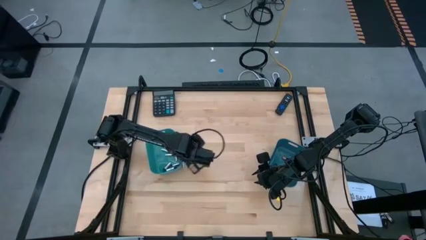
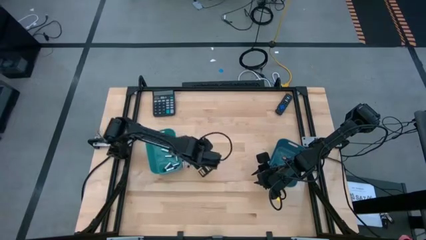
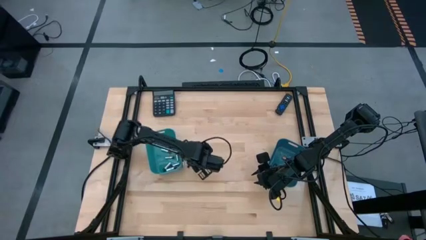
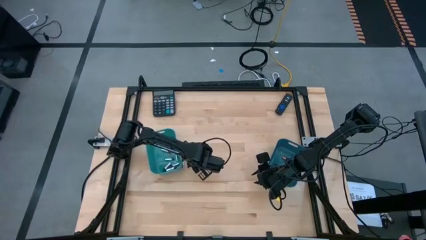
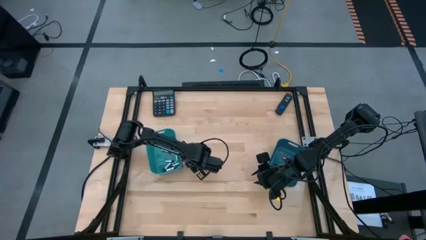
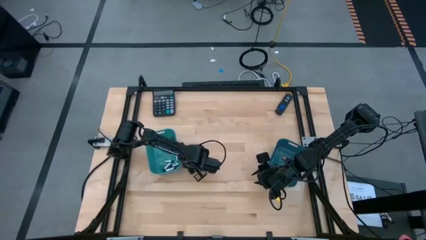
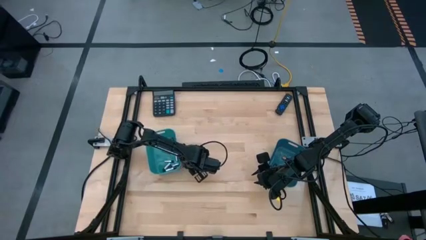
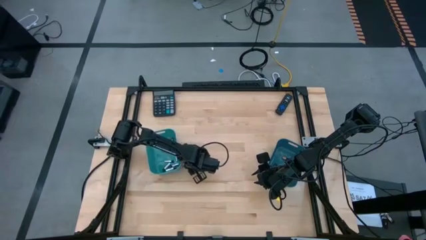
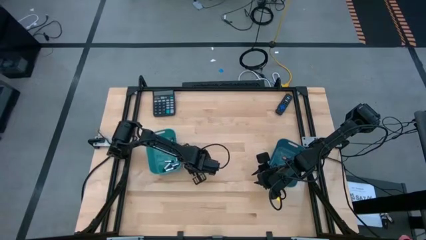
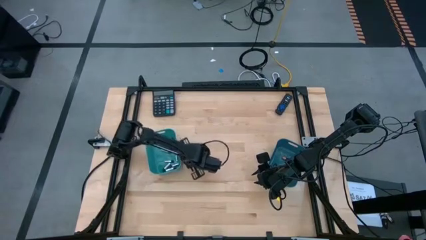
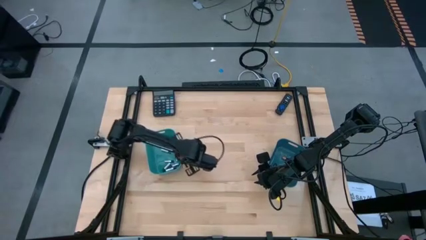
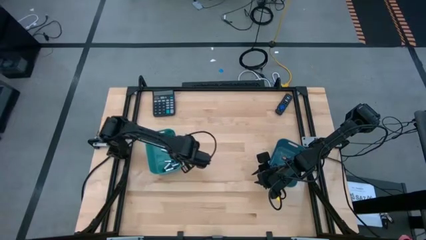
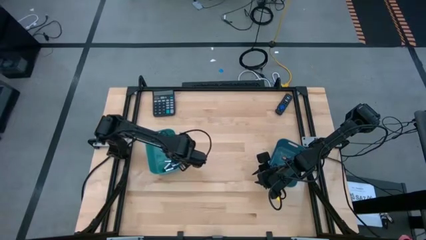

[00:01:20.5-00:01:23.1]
Task: Sort batteries
Put the right white battery into the left blue bin

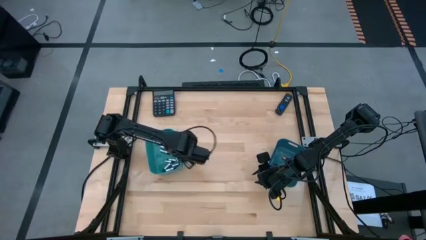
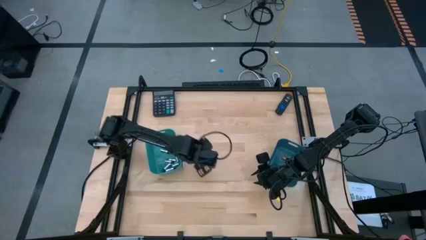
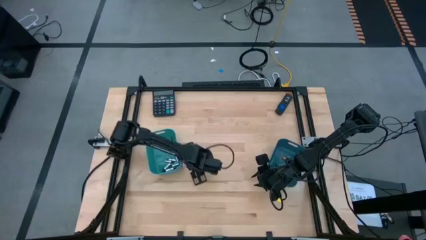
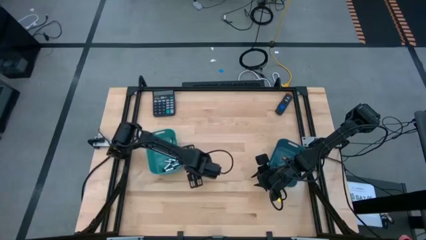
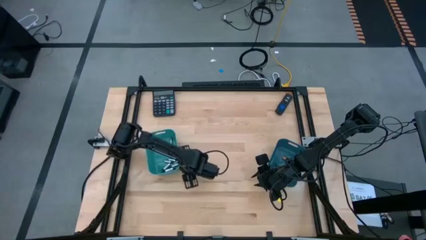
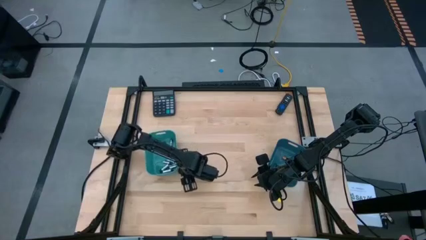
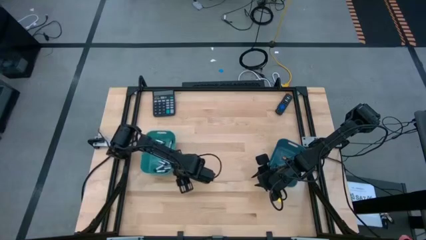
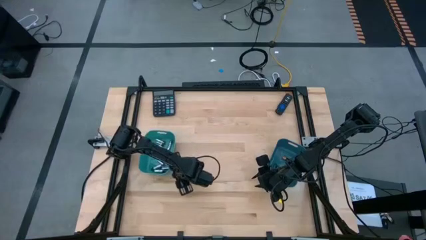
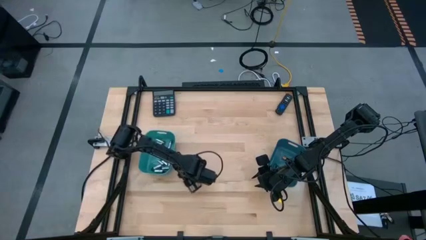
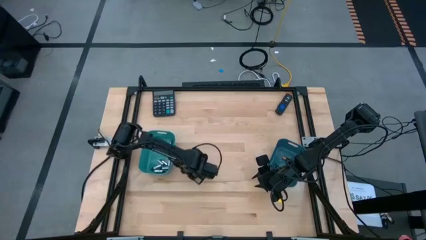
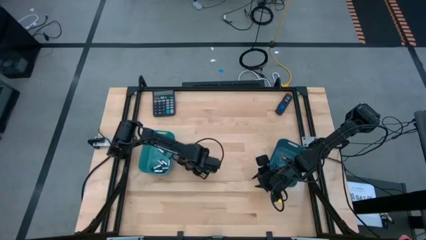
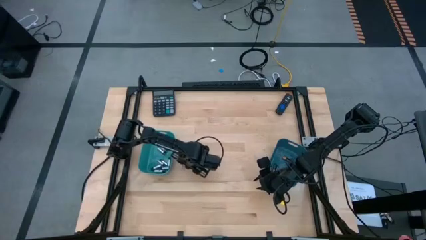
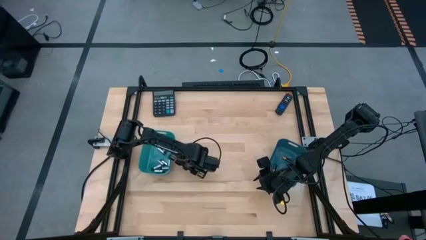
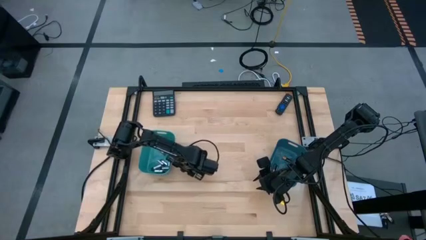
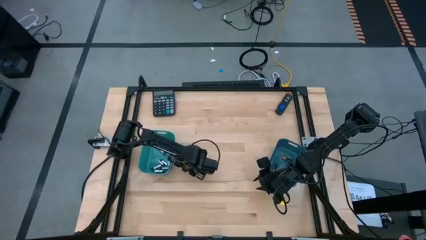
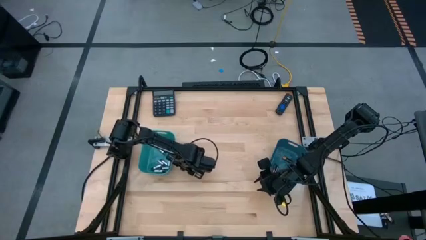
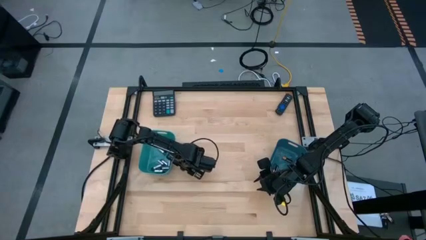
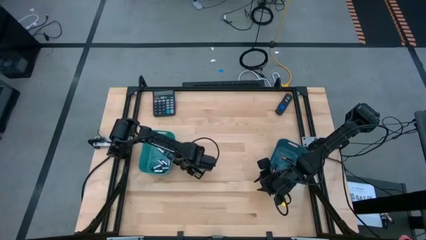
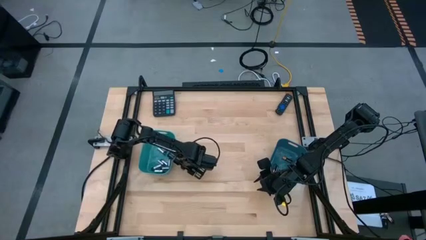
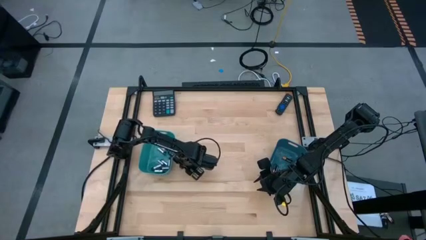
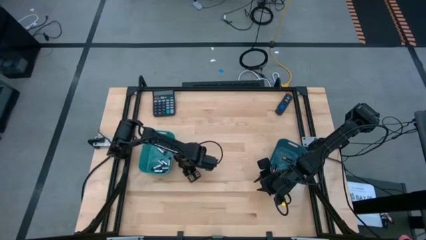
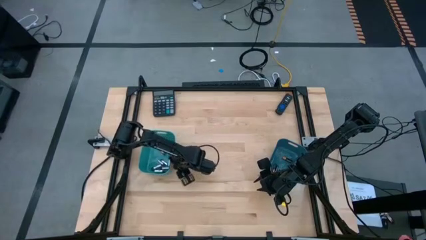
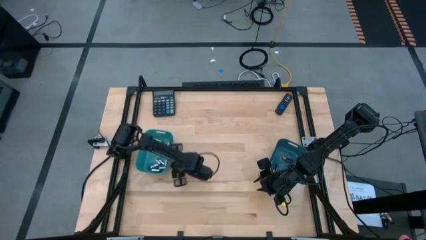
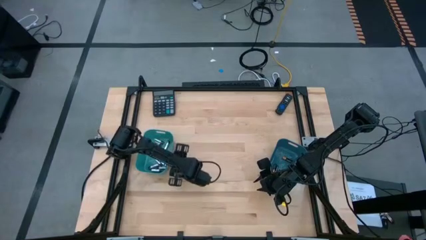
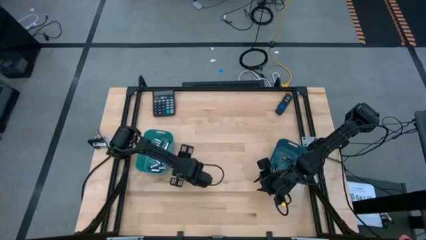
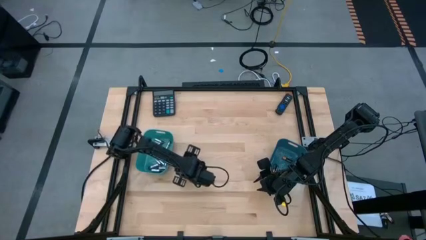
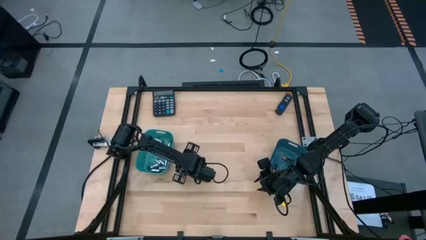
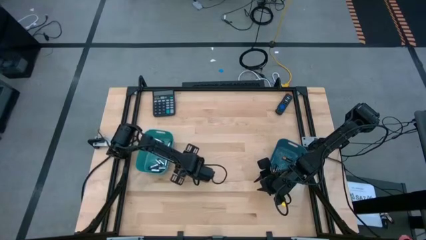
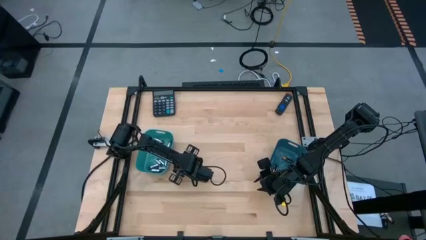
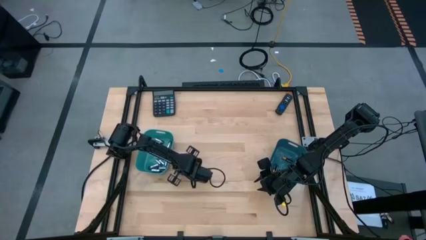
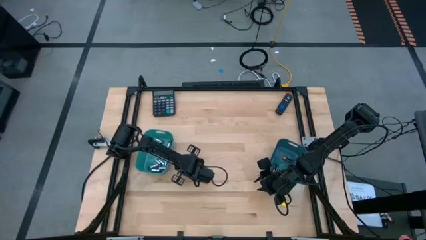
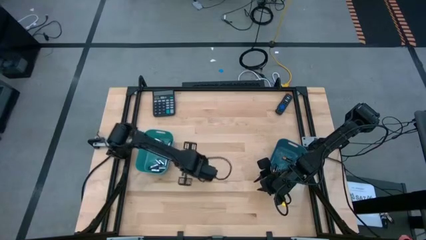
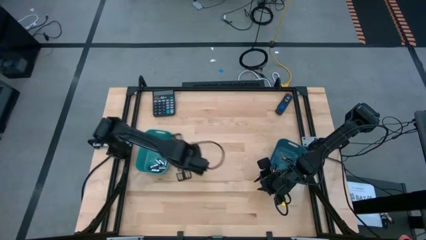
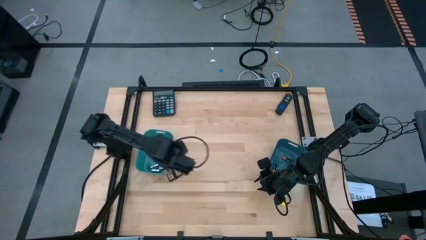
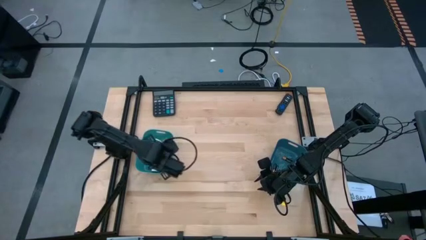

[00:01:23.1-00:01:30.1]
Put the white battery into the left blue bin

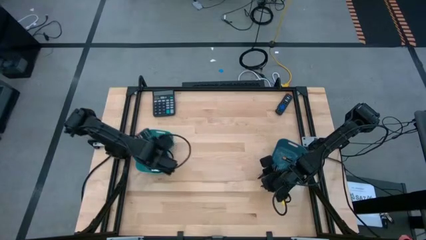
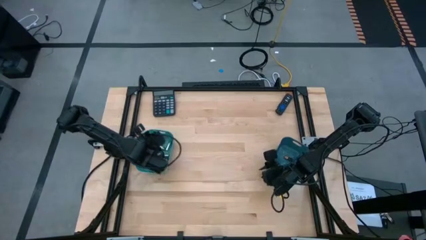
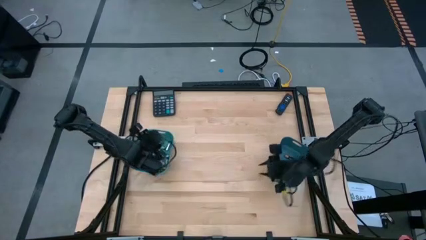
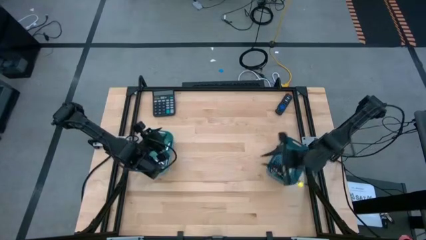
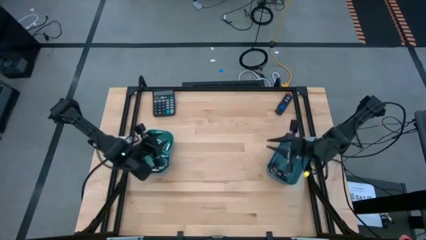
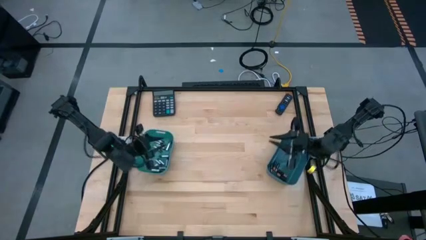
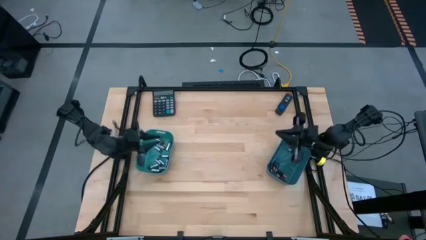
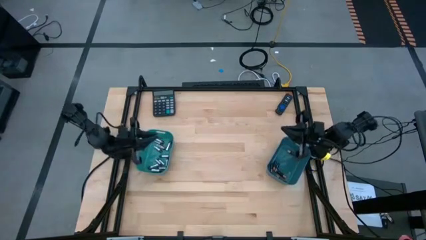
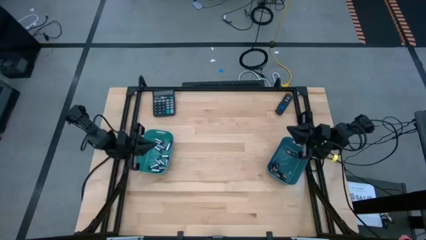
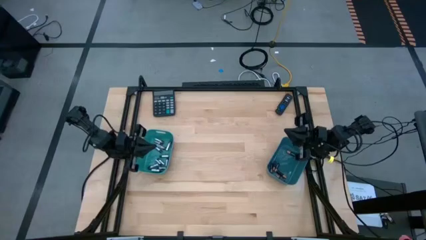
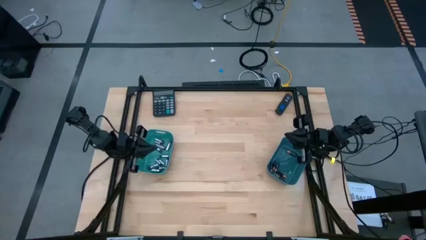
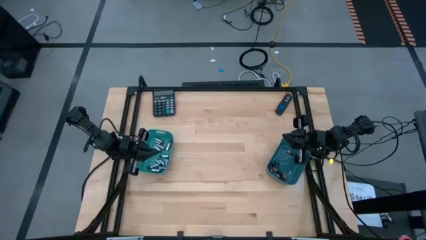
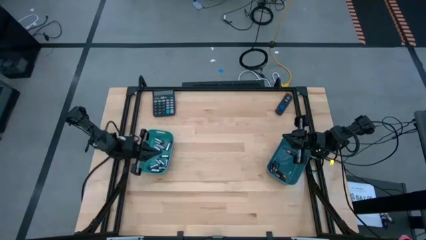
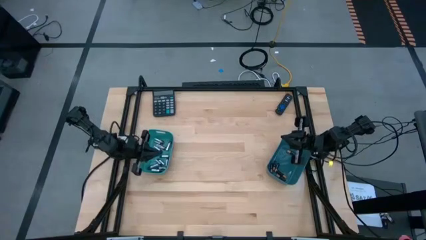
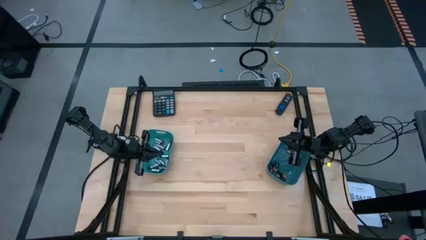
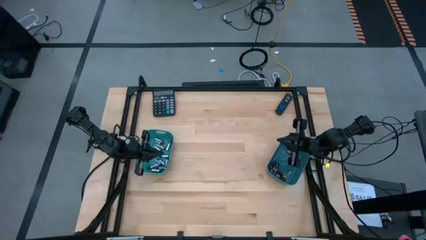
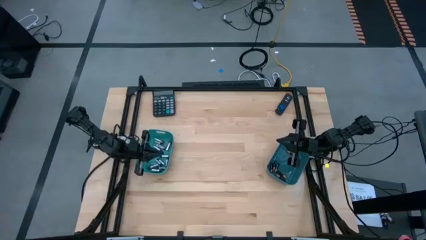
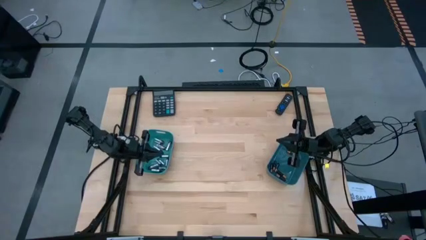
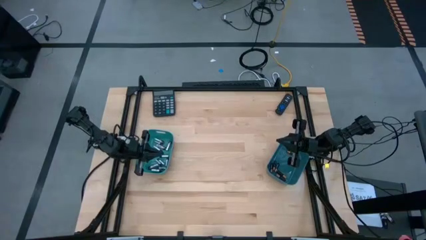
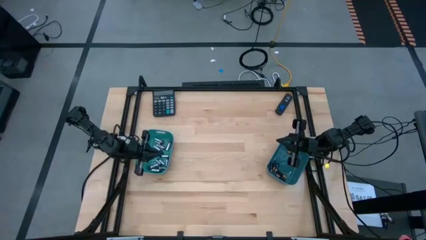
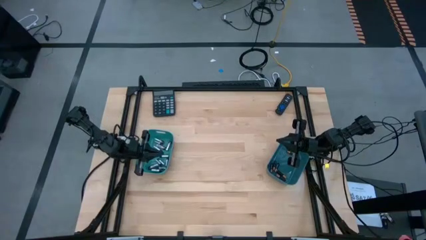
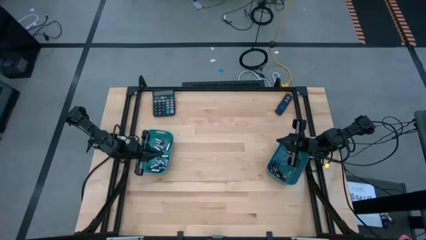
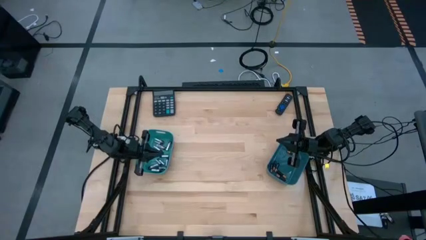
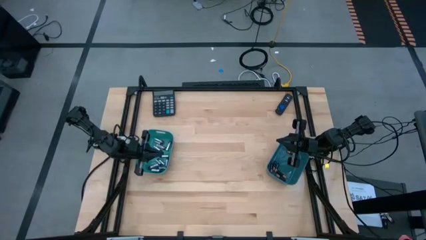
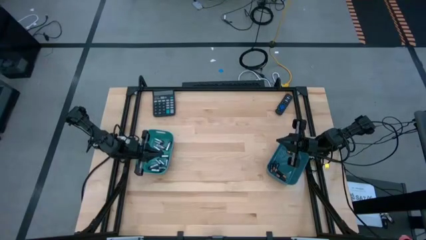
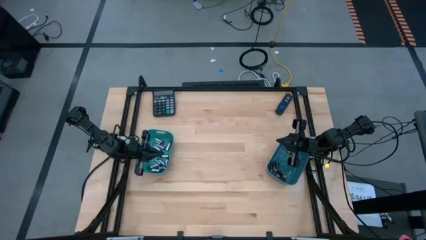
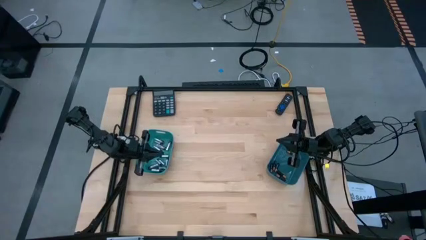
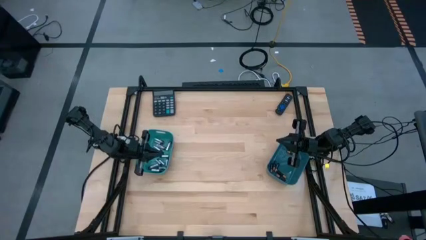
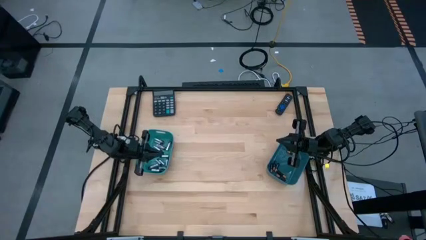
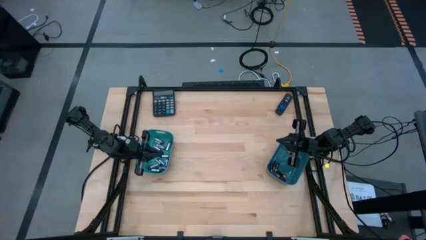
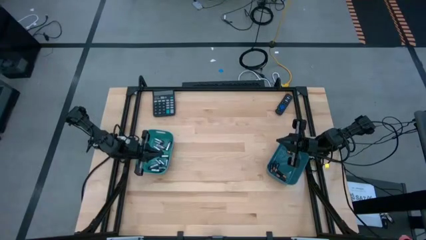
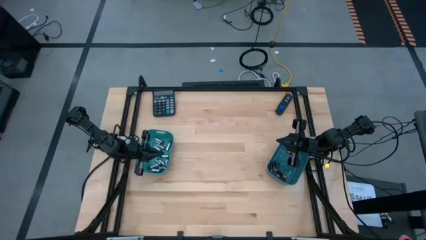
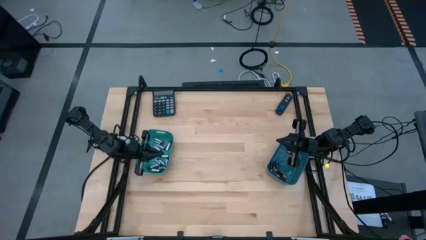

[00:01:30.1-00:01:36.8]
Return to Home Position
